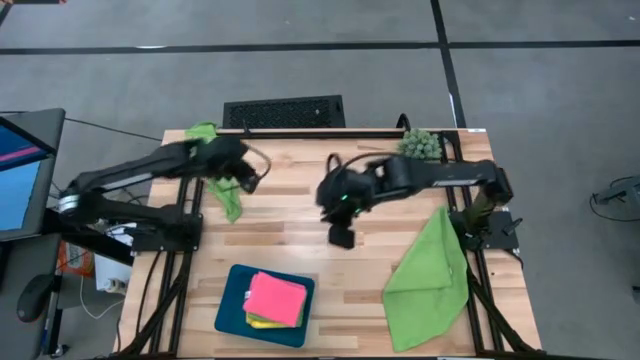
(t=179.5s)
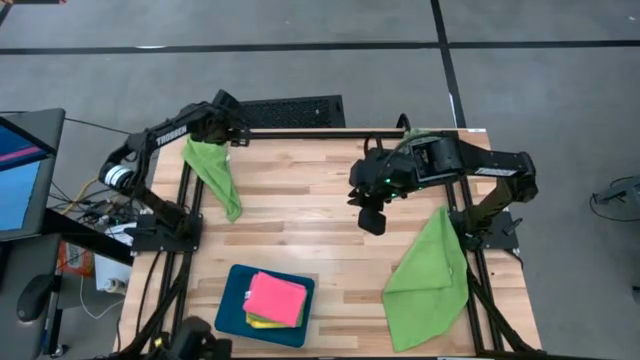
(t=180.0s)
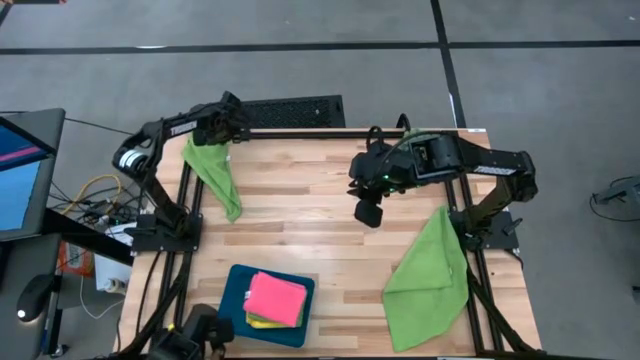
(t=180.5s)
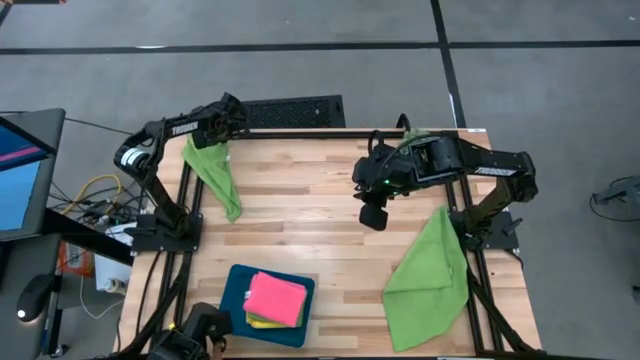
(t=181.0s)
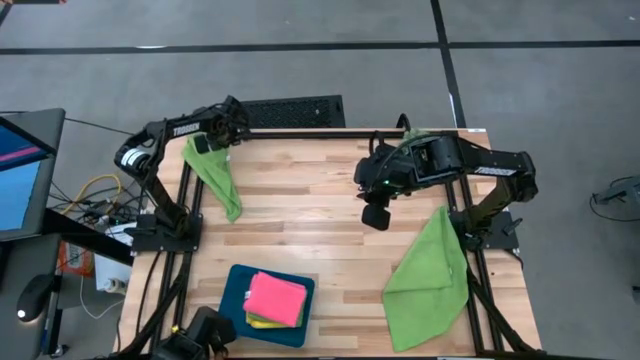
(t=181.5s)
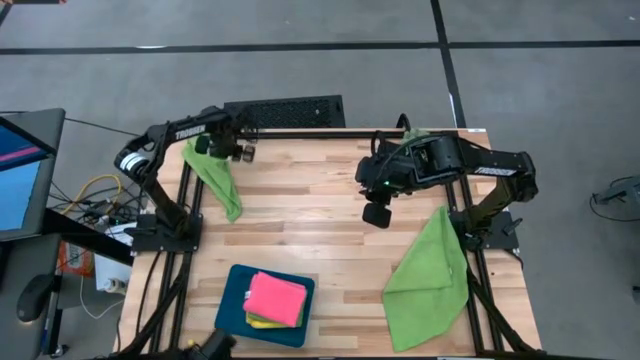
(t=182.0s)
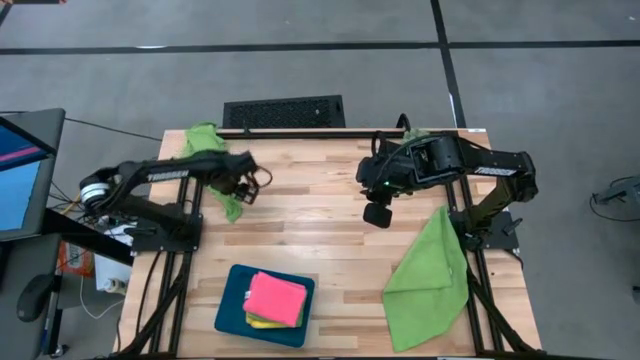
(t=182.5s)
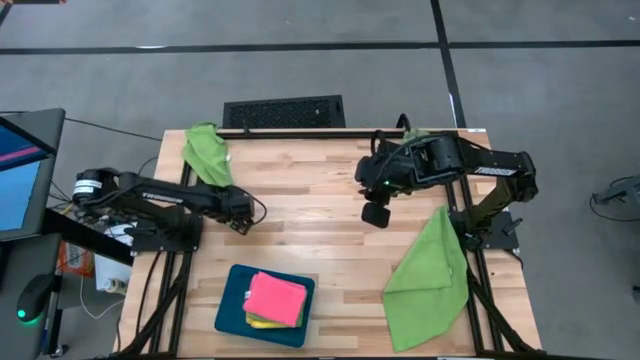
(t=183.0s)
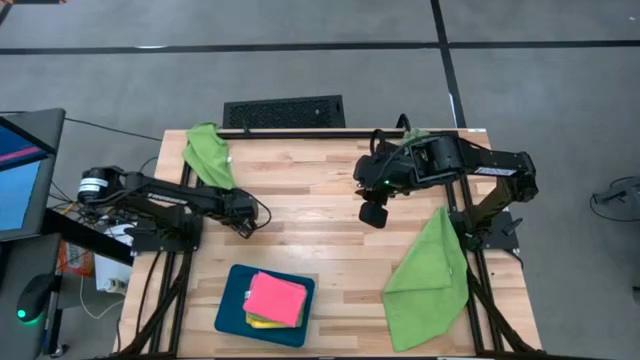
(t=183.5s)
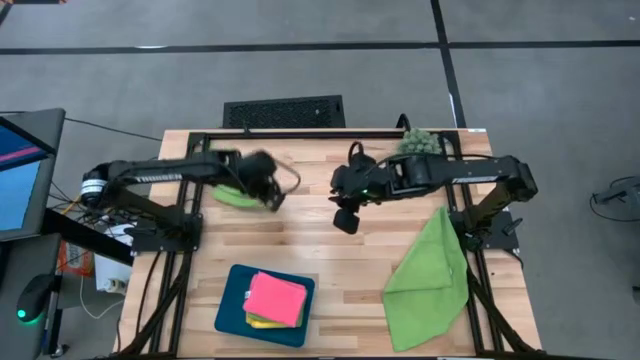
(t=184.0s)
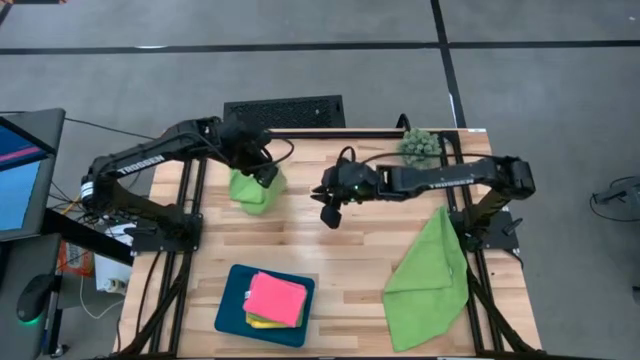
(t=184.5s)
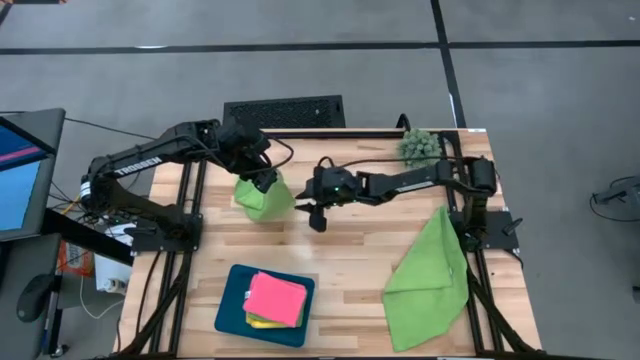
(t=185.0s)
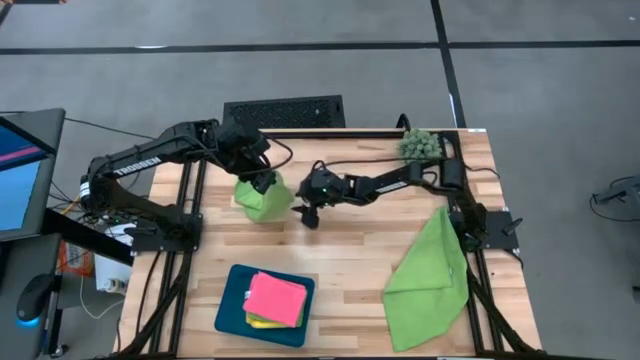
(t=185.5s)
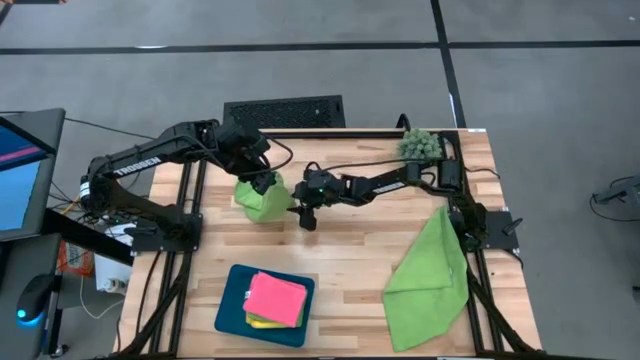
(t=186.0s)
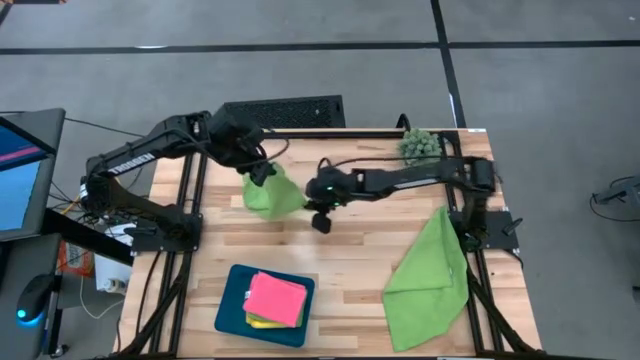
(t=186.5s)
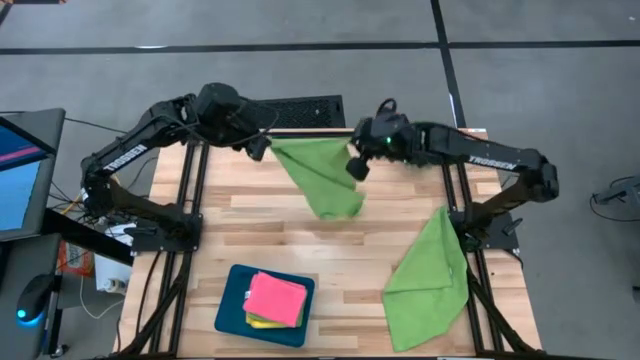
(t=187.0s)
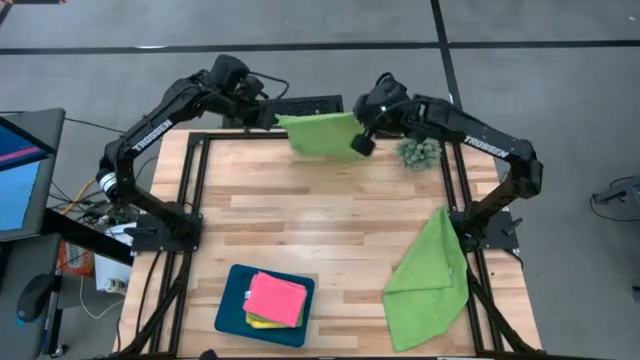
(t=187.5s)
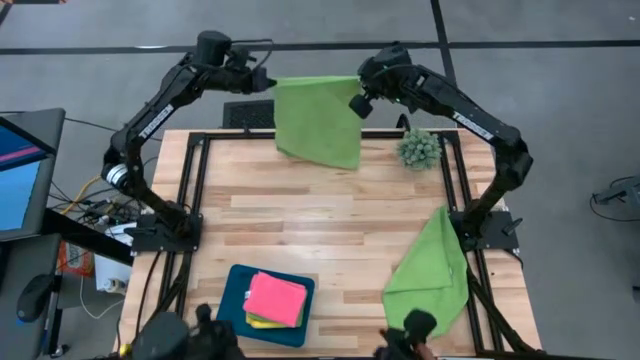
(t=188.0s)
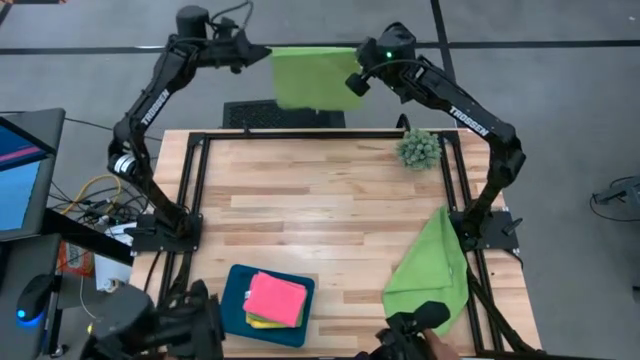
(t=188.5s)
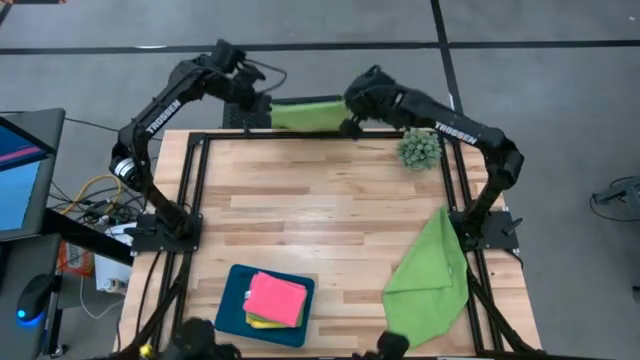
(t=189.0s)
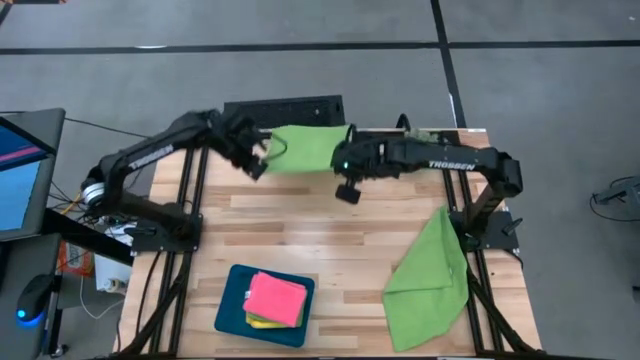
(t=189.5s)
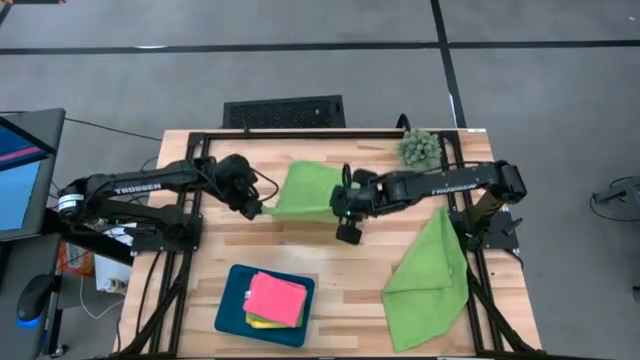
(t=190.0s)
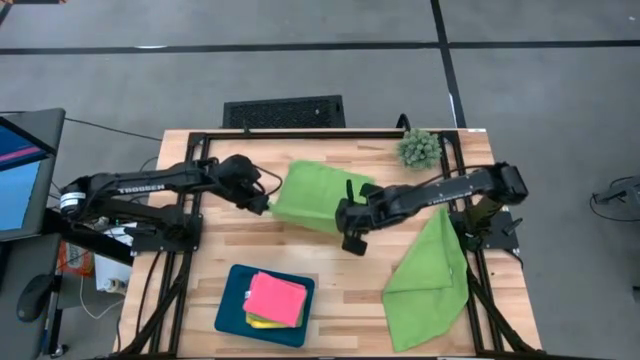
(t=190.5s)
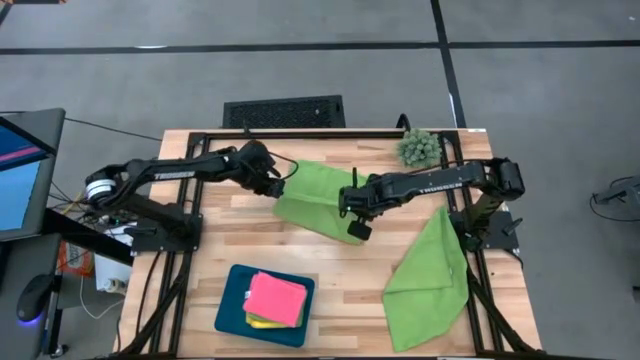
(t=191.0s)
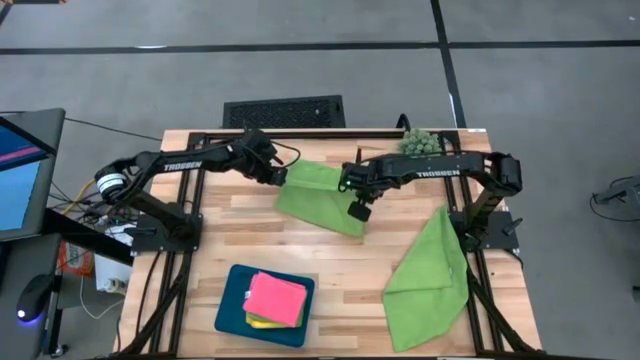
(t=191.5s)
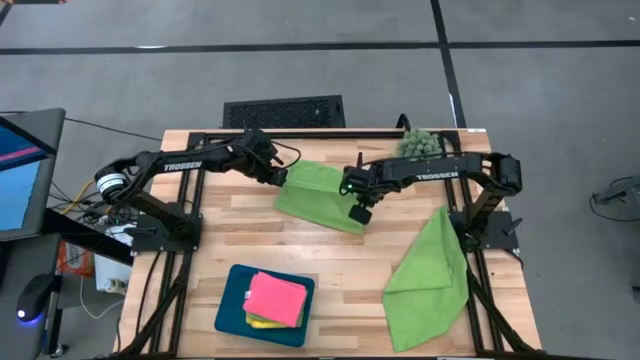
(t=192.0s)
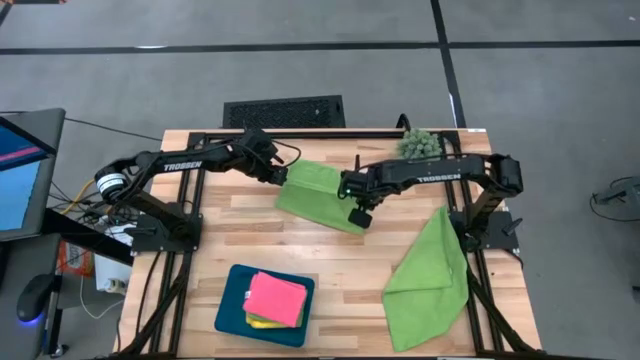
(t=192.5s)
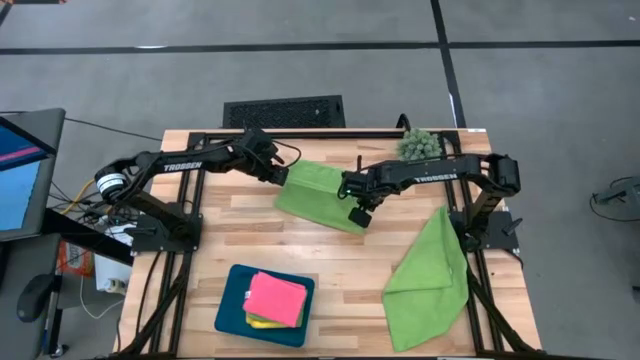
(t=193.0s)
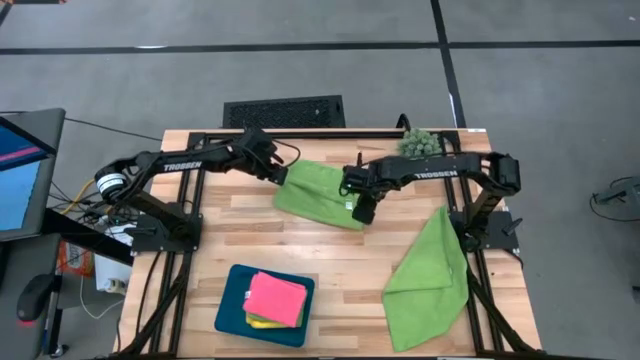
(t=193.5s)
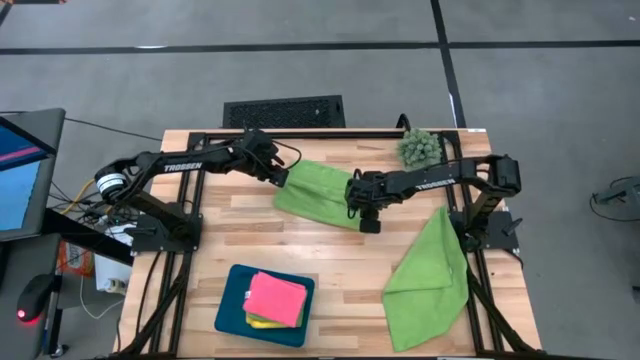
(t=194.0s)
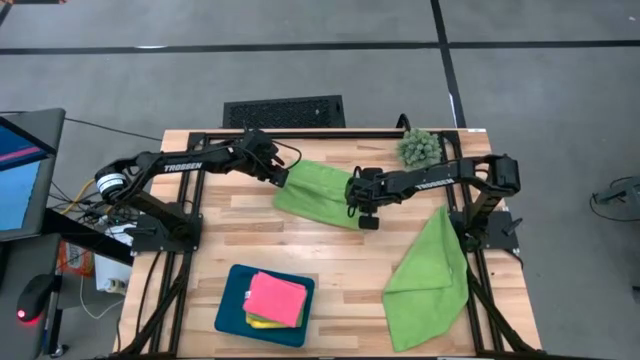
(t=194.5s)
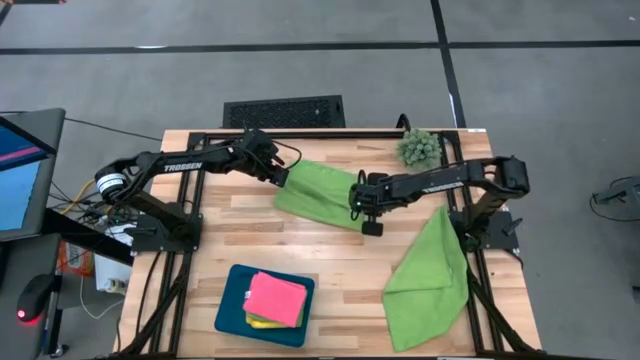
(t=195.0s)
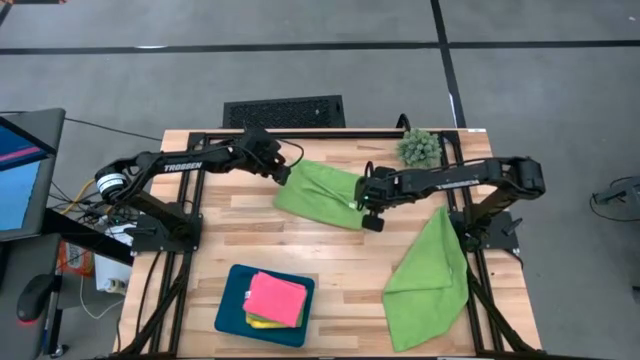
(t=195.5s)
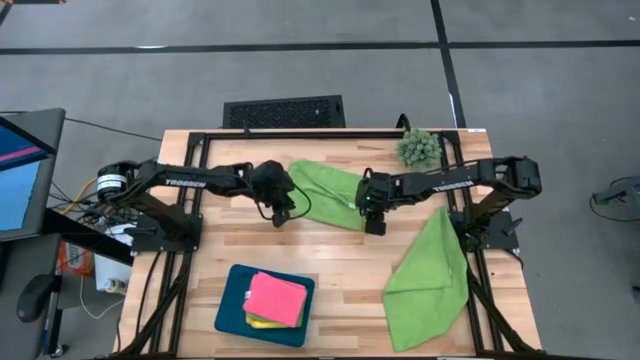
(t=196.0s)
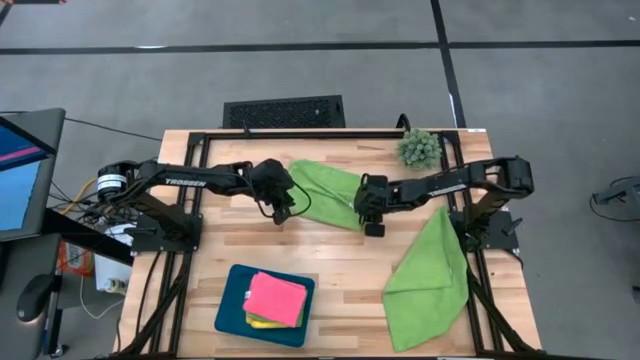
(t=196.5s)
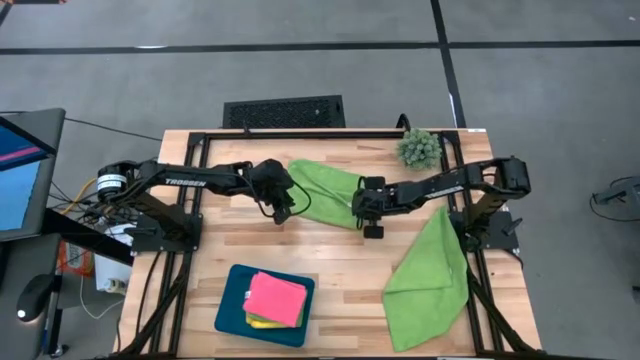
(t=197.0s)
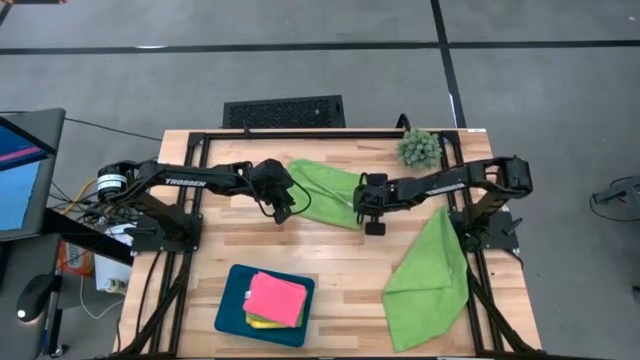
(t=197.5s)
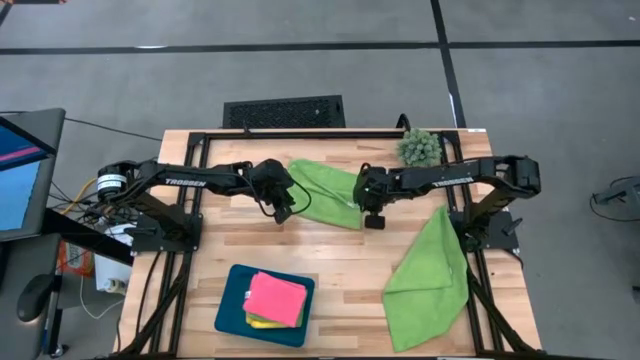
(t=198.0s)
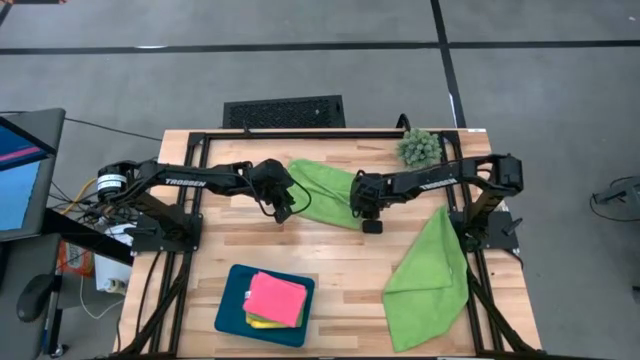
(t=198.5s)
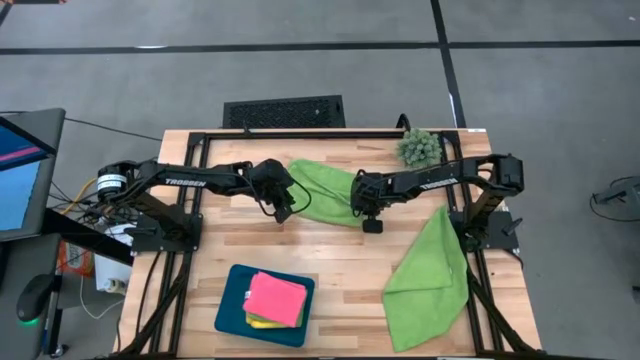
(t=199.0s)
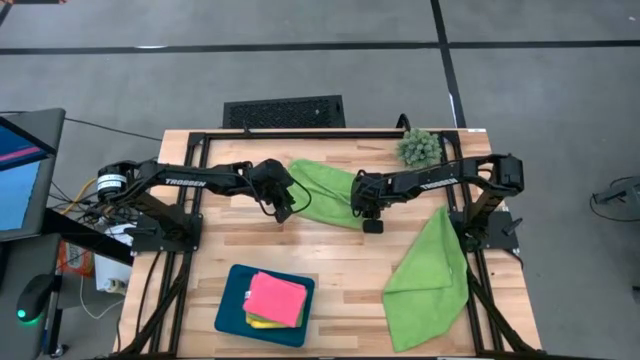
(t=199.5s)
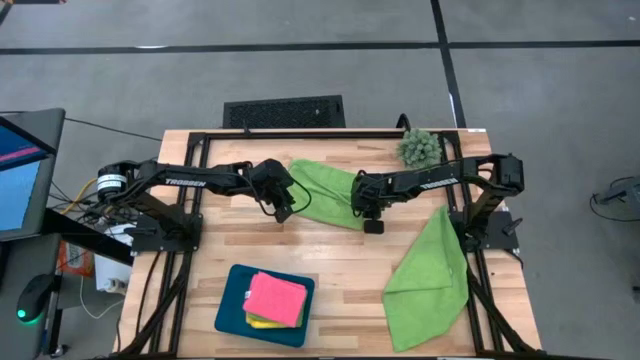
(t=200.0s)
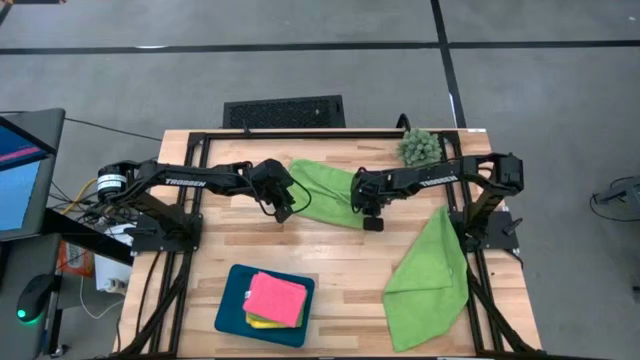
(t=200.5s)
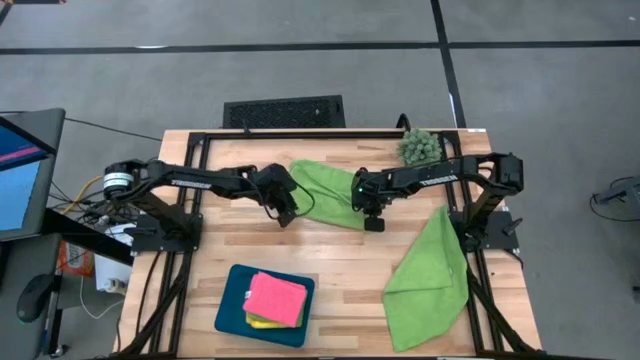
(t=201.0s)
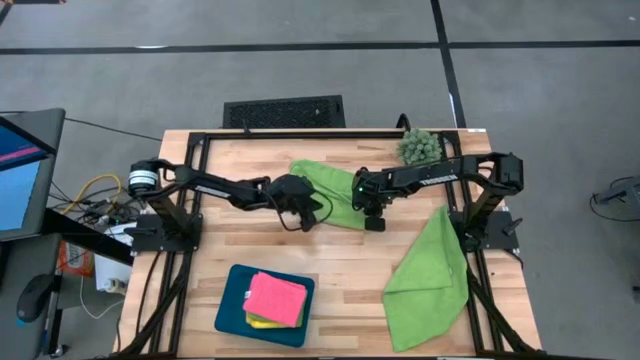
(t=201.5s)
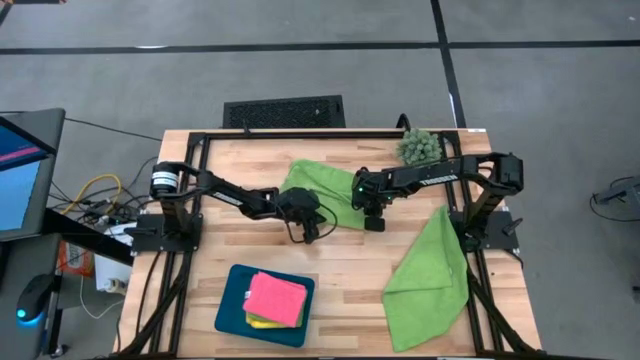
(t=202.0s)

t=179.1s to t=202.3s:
Task: Fold microfiber towels
Fold the top green microfiber towel
